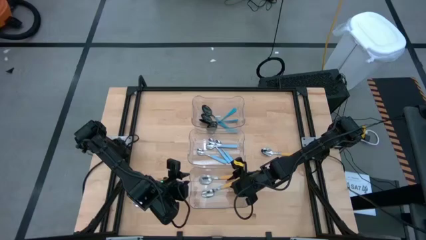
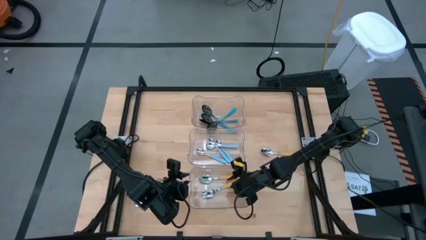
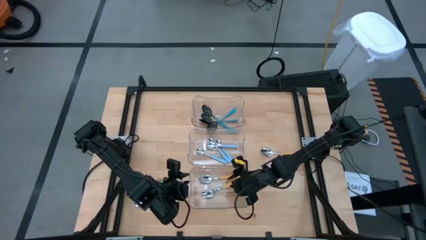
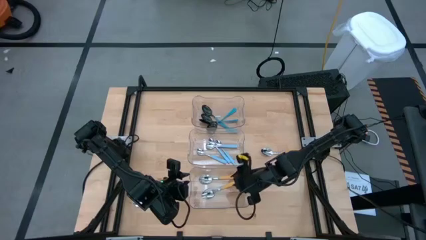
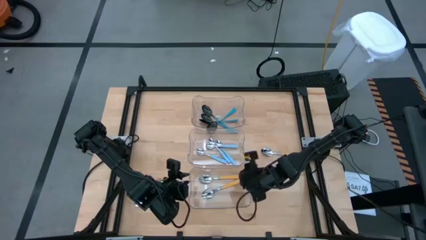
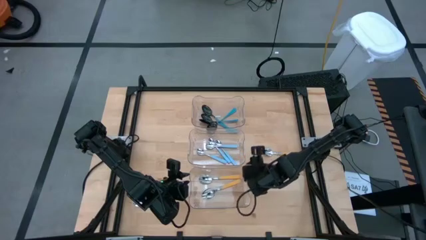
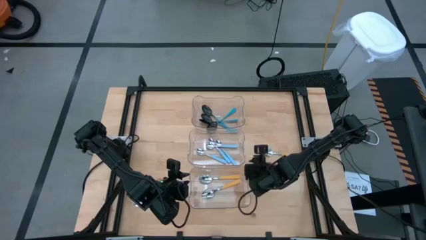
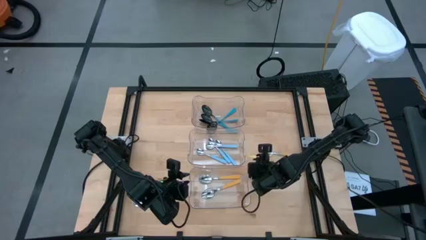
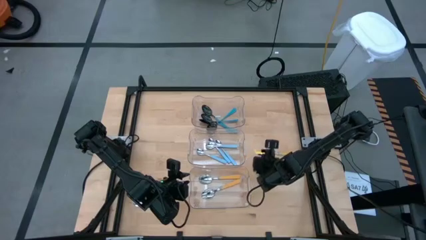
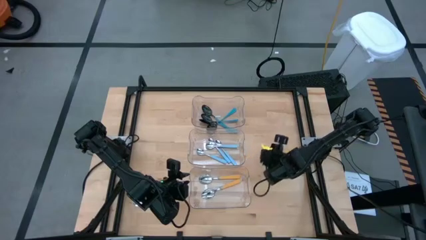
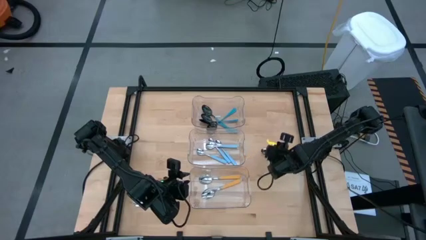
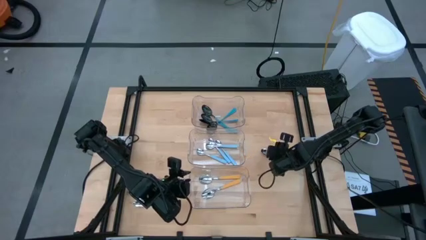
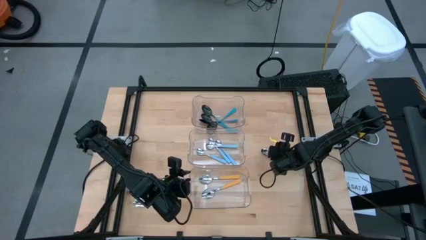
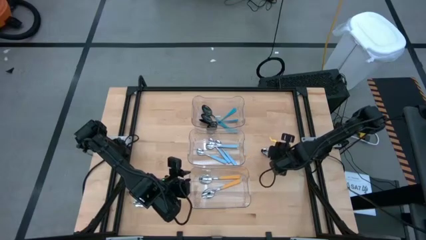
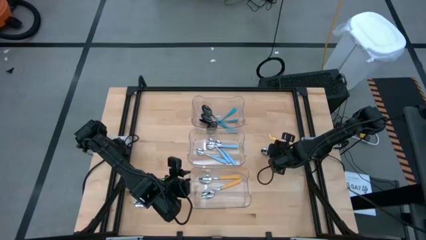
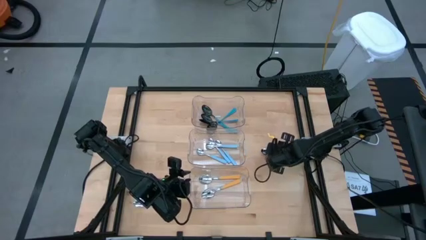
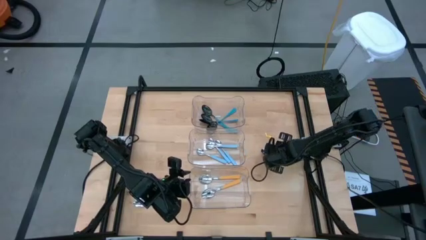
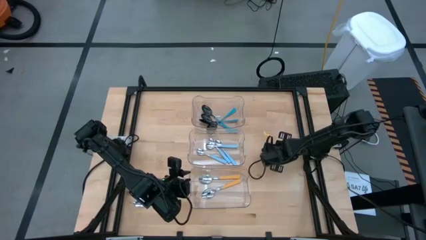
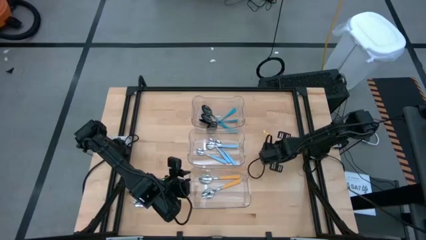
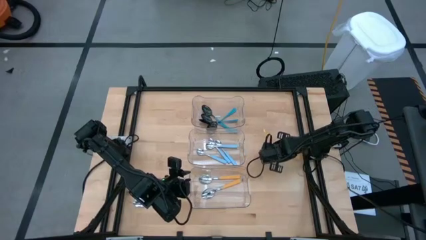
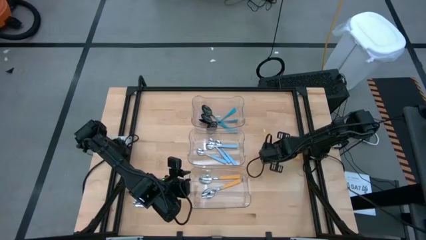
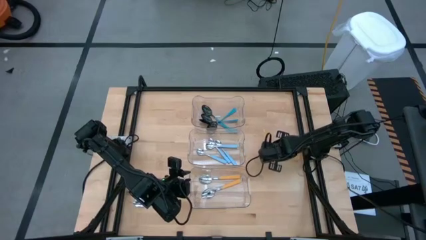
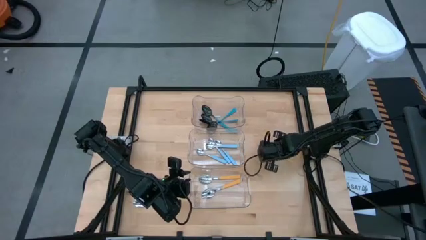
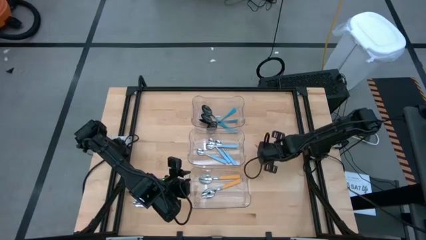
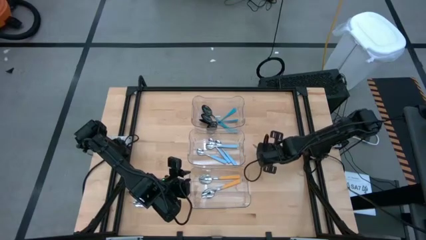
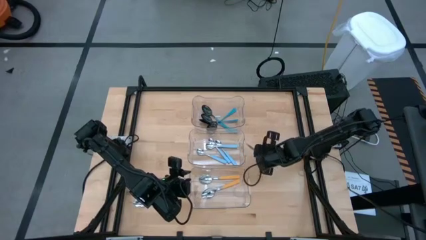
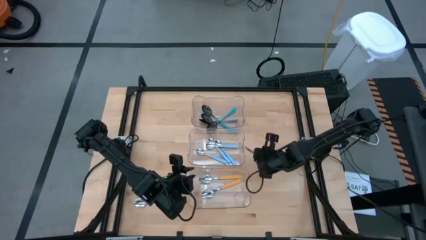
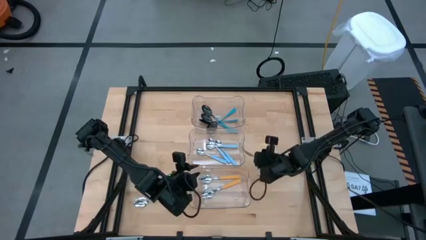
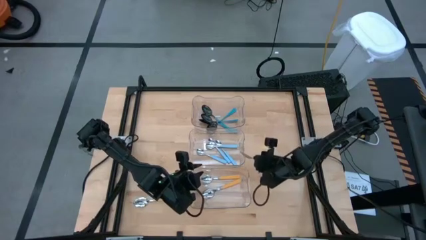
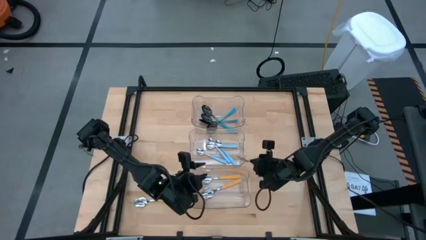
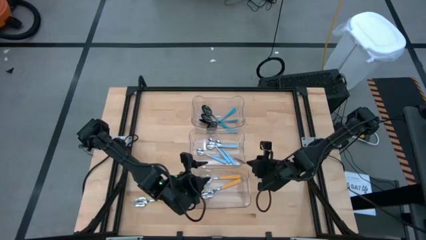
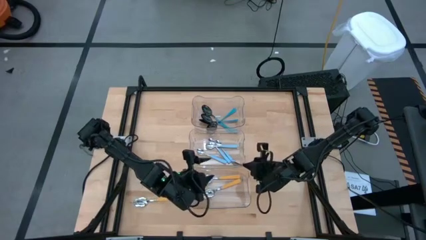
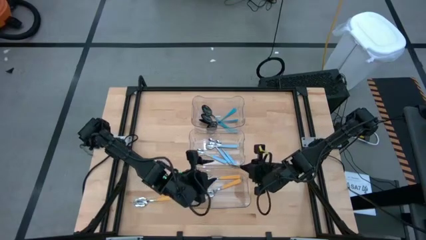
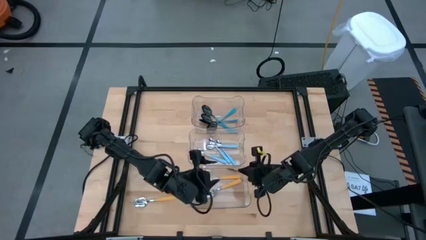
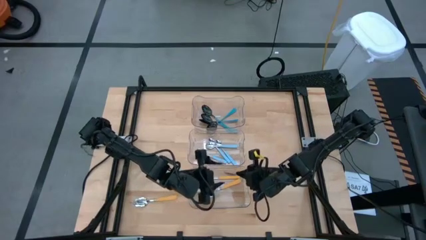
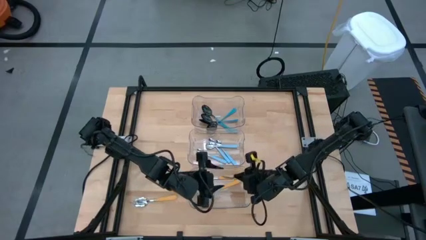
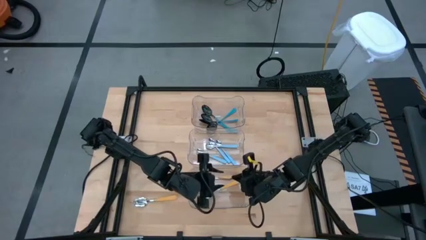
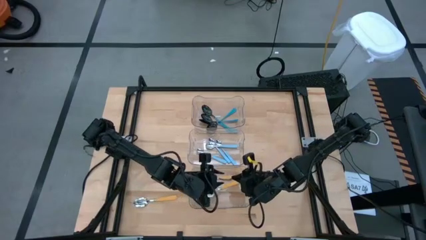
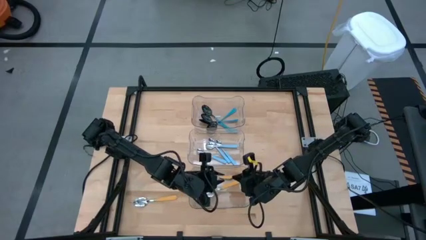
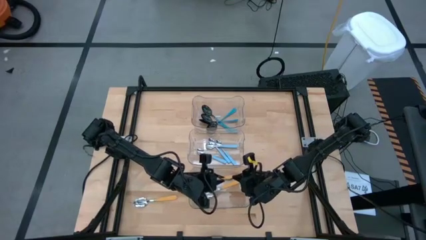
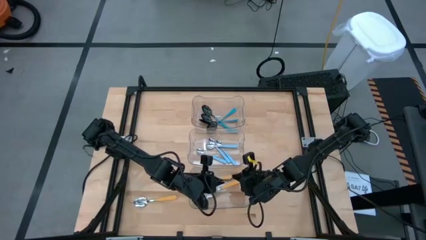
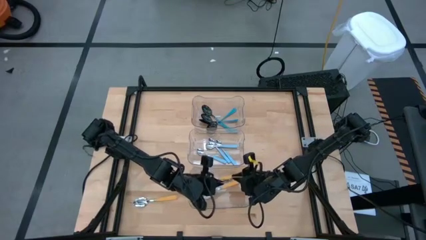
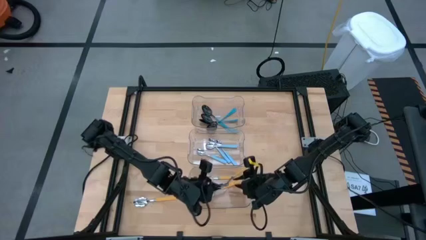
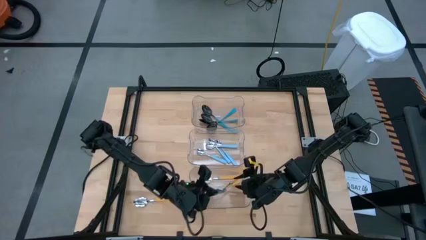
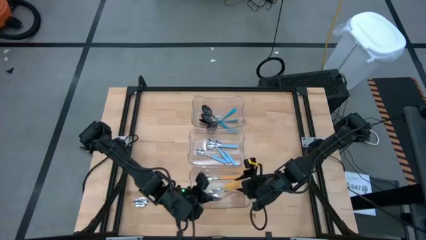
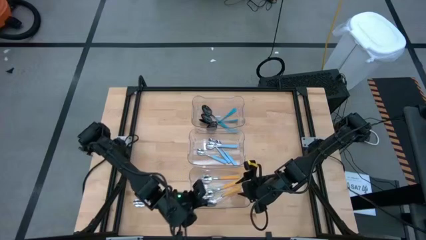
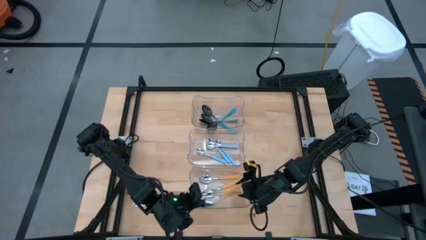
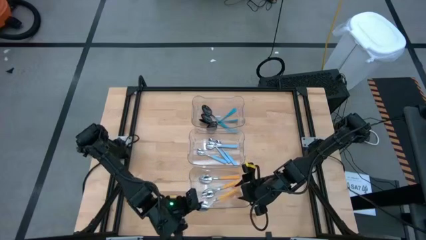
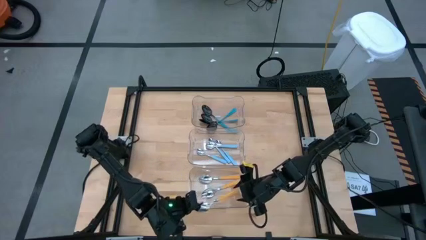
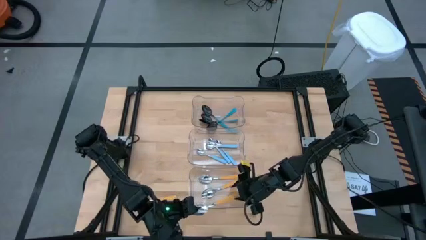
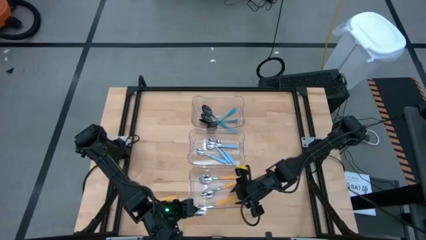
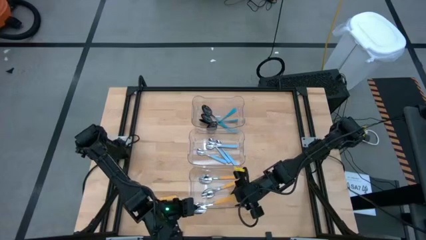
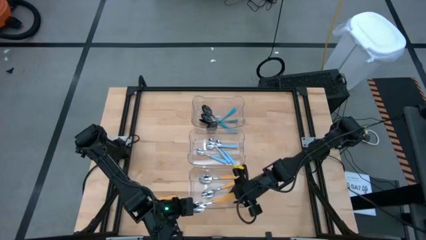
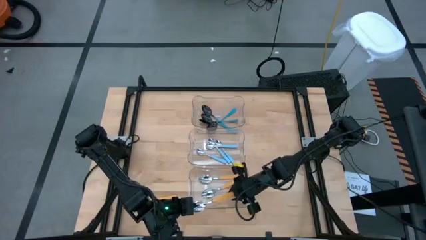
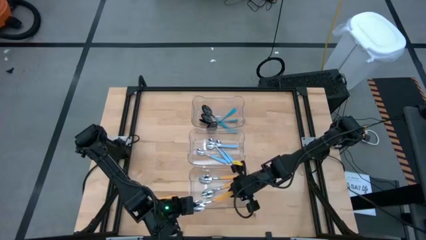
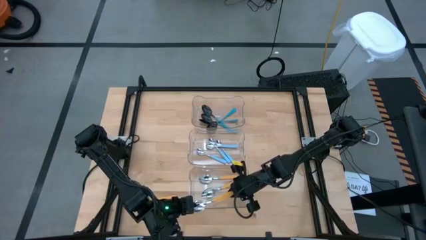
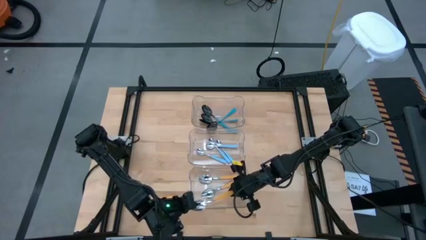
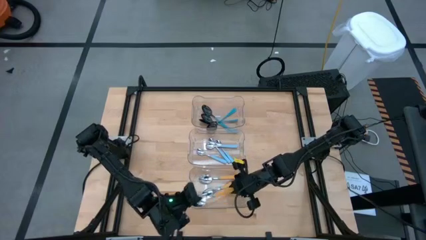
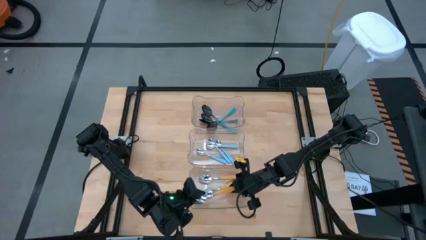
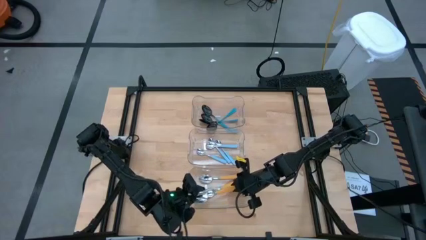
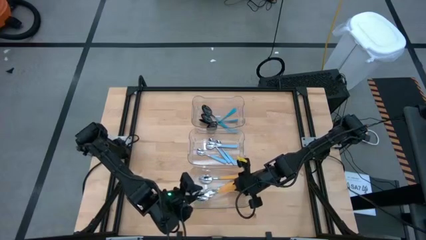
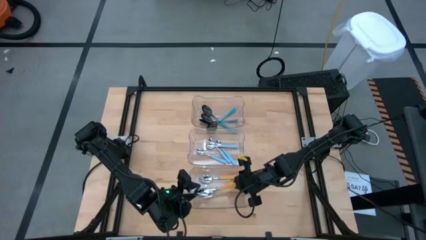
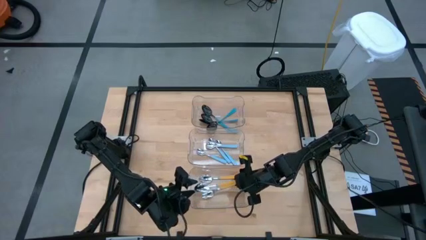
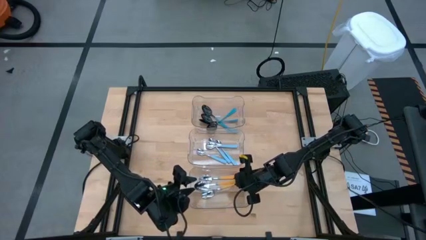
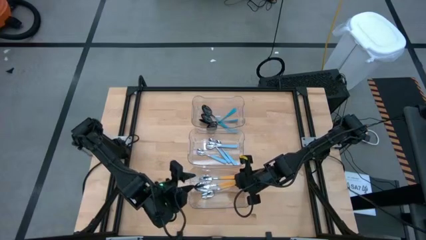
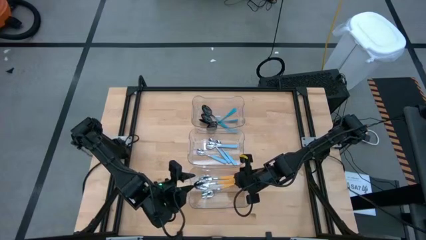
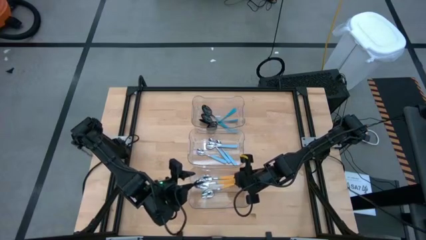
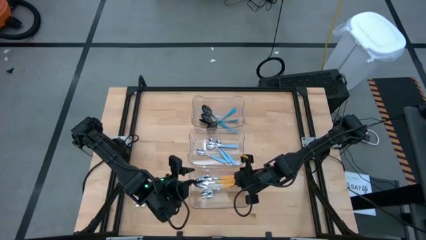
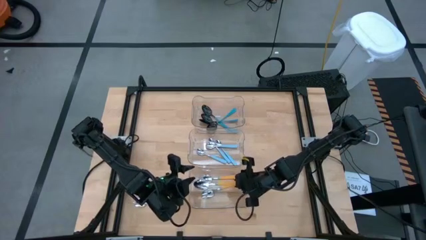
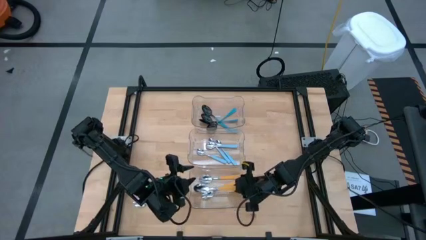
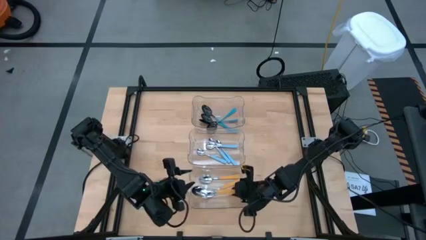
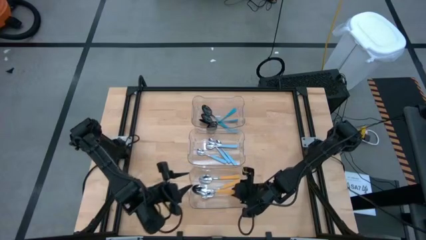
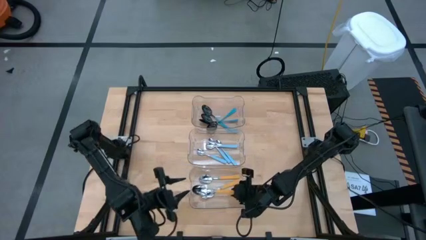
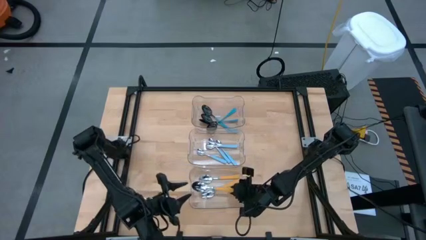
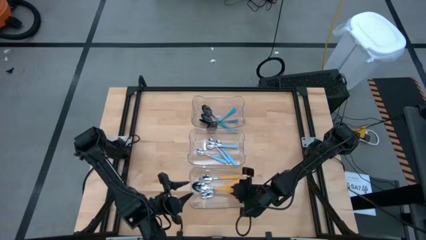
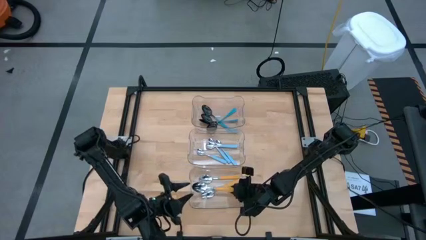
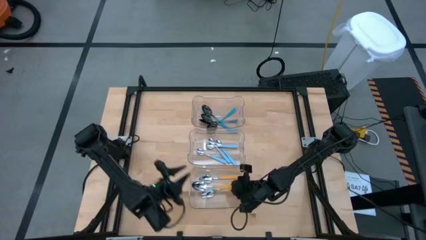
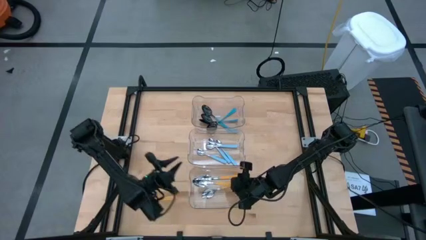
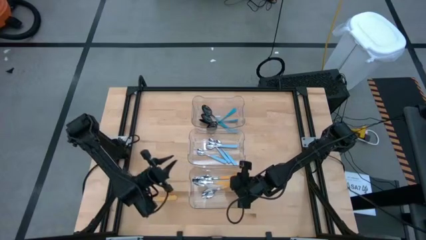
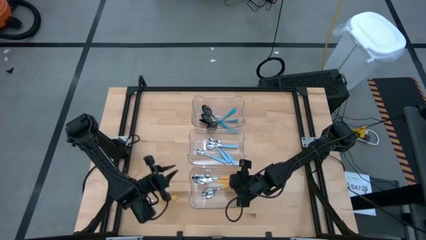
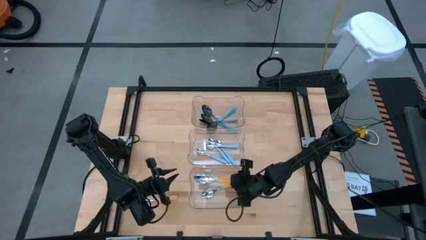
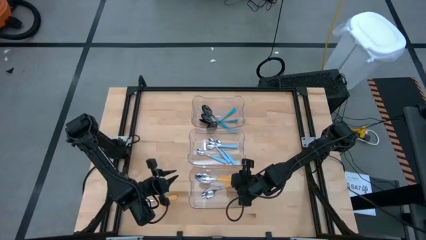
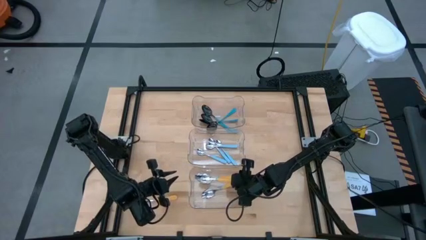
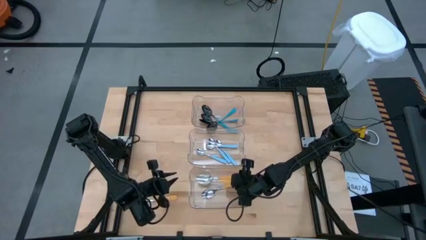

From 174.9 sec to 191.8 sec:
Task: Sort silverware by color (type)
Put the yellow spoon into the bottom transparent bin
